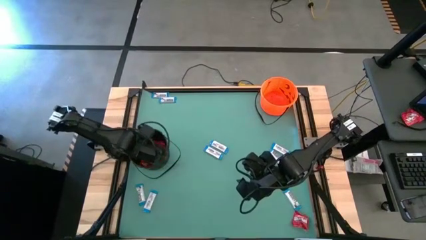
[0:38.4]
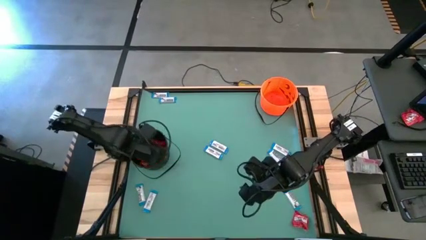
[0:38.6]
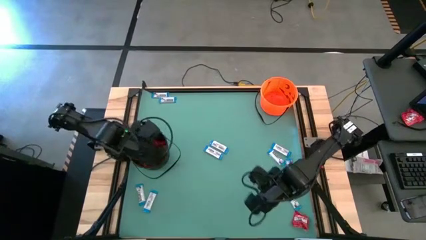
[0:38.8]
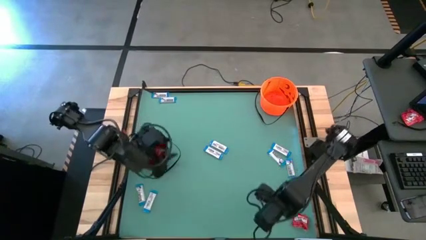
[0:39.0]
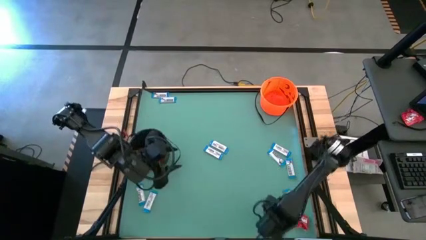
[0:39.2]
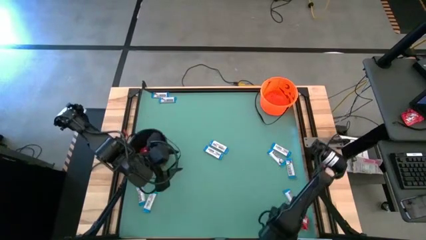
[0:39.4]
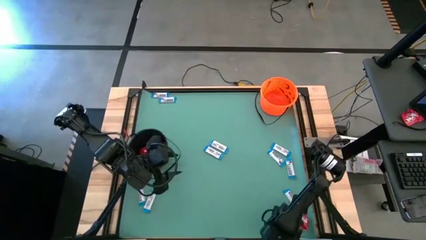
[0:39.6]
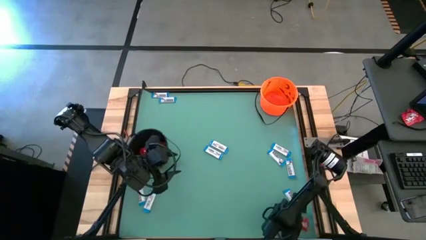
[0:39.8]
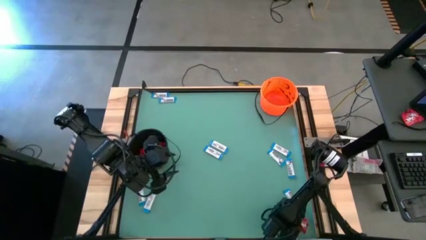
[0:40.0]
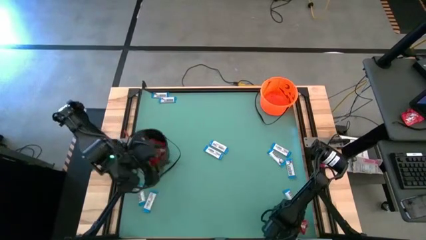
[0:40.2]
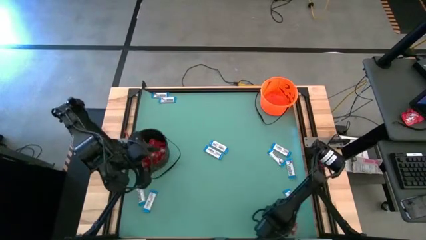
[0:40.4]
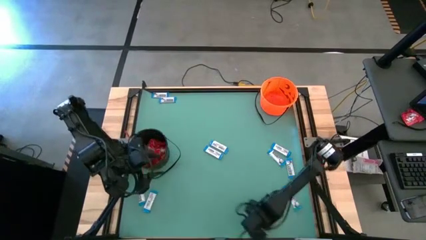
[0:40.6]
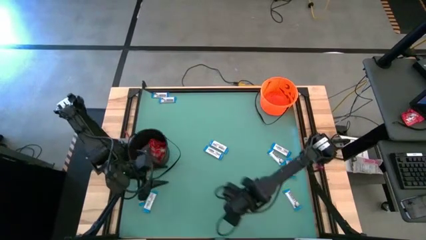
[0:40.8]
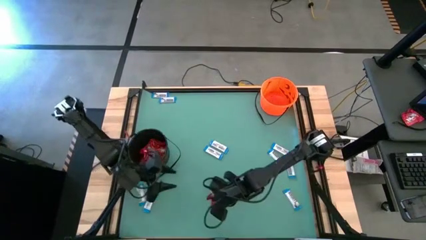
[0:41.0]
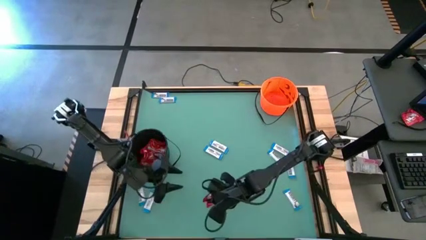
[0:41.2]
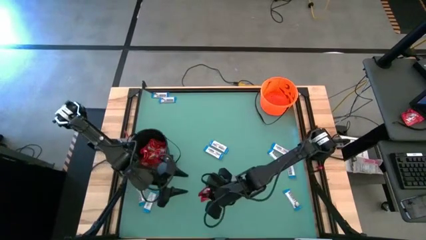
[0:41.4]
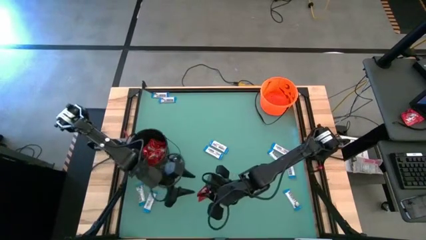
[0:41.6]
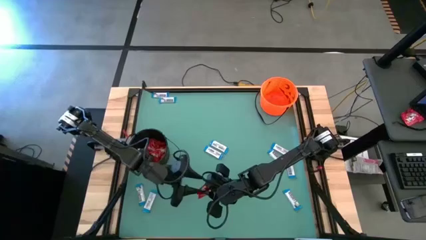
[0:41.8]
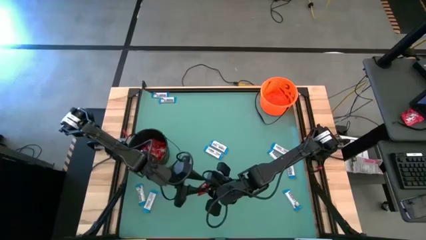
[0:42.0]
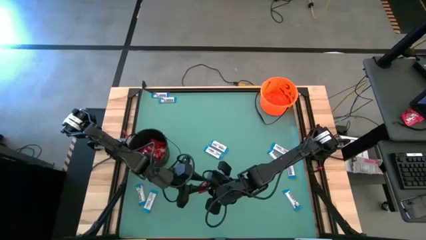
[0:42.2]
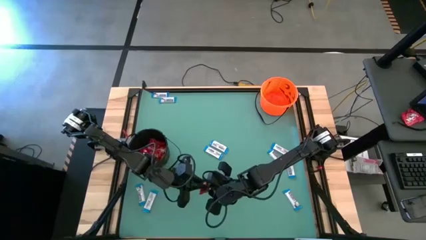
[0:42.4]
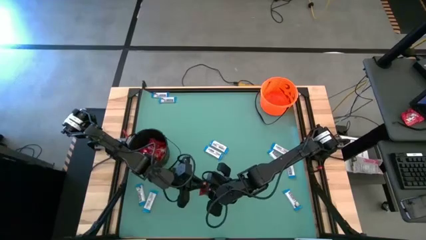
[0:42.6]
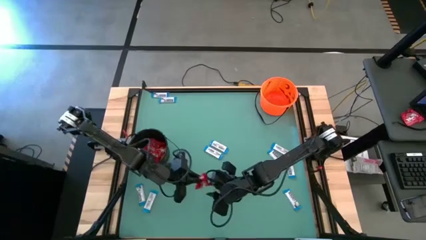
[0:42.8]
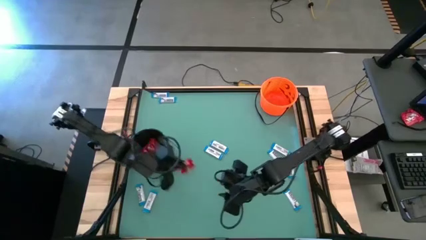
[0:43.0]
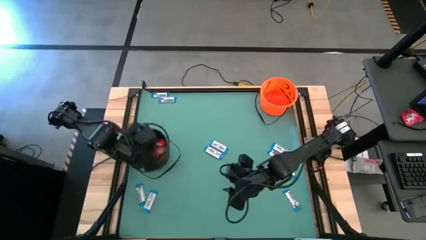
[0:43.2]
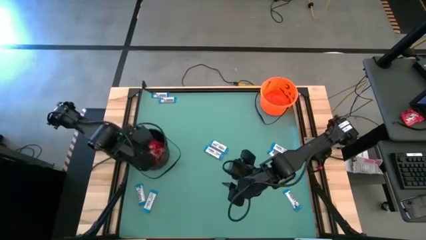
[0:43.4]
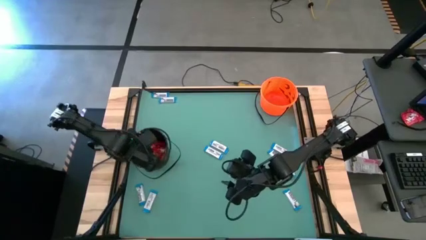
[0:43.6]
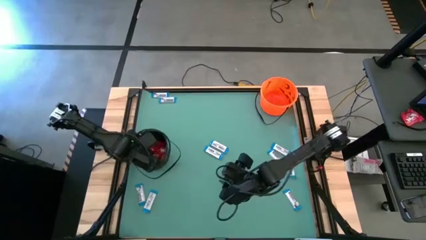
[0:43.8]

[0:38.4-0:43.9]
Task: Sort candy by brand, put in halloween buckets
Put the red candy into the black bucket

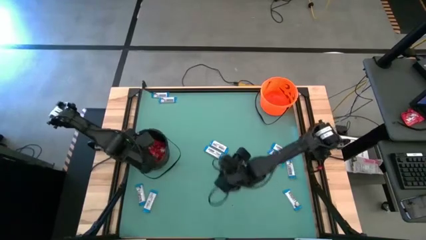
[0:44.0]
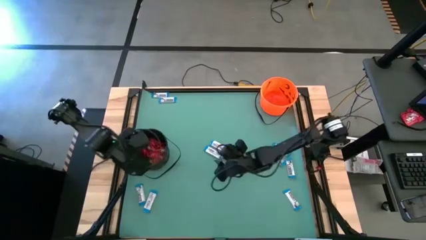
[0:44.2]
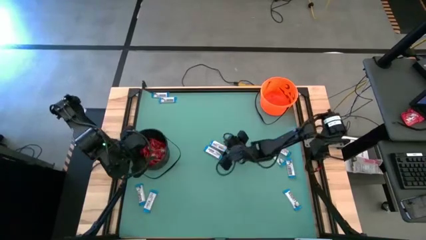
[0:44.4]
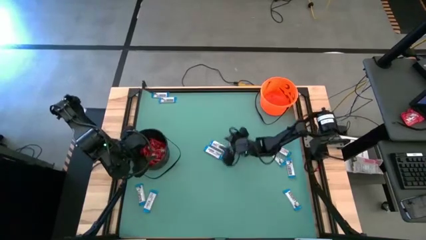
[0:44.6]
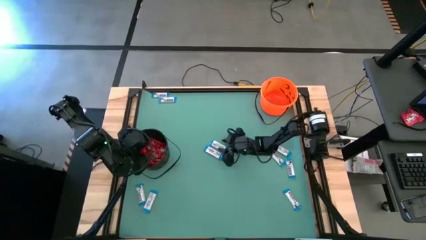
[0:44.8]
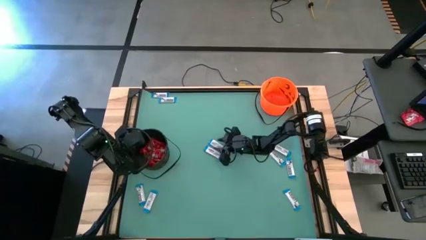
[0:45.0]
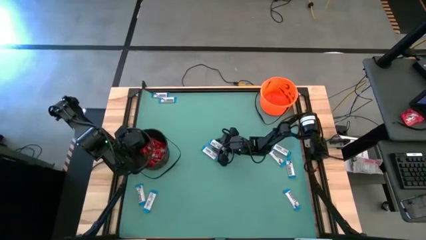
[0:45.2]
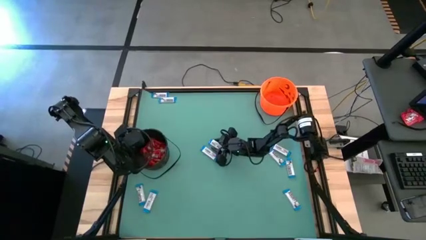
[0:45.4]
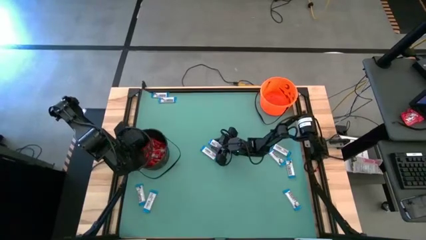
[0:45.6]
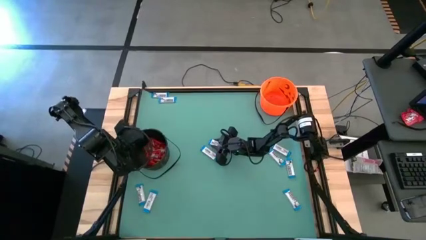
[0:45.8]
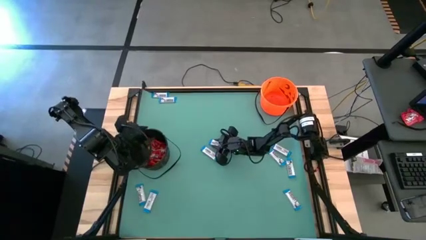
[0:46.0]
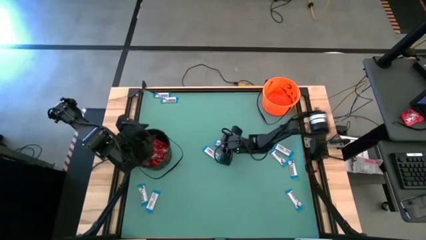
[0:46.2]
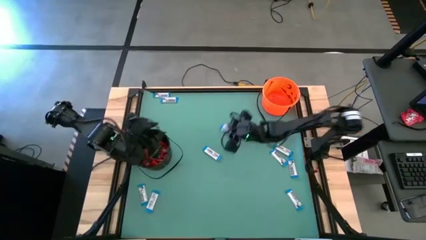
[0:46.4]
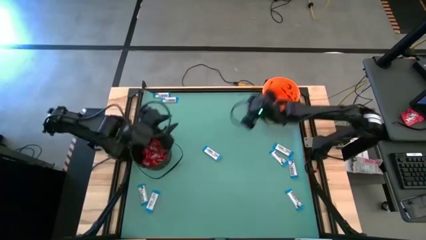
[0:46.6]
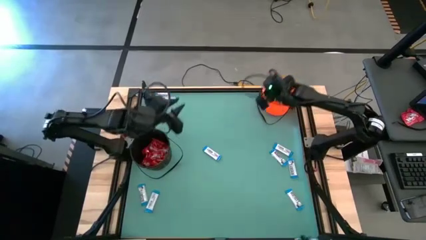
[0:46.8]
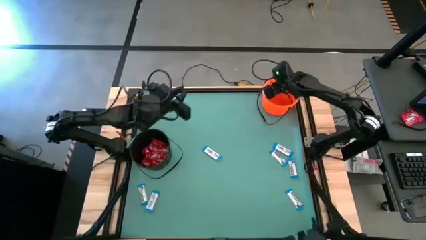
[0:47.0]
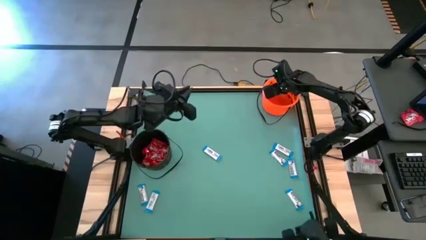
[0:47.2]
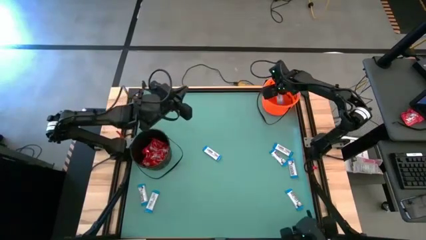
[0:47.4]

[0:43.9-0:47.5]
Put the white chocolate into the orange bucket

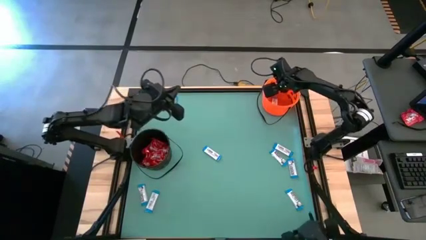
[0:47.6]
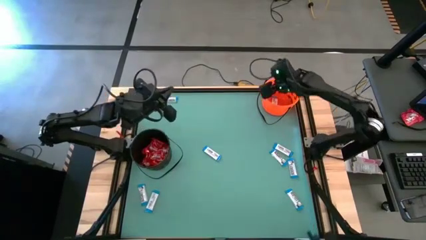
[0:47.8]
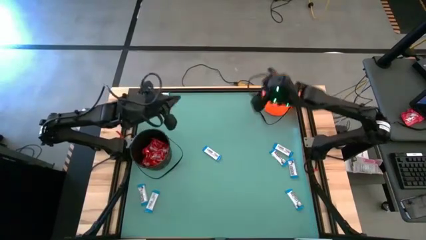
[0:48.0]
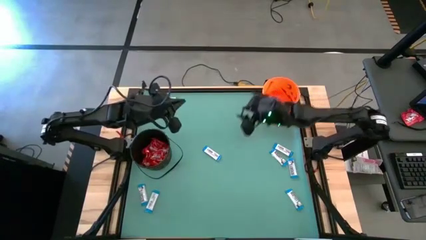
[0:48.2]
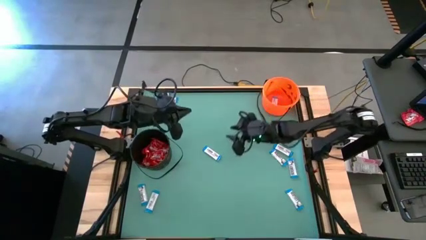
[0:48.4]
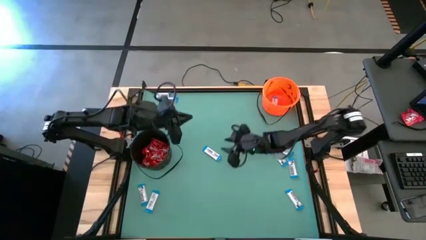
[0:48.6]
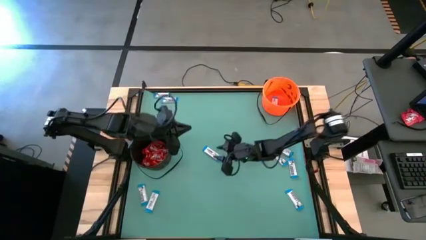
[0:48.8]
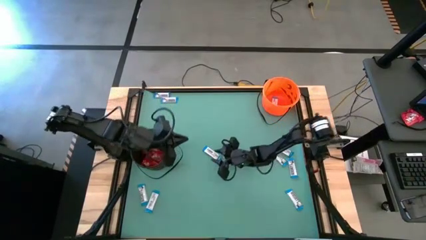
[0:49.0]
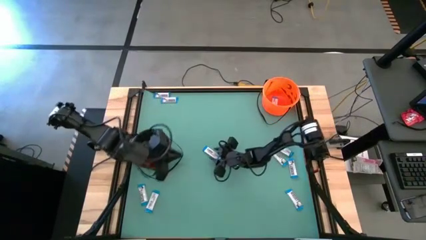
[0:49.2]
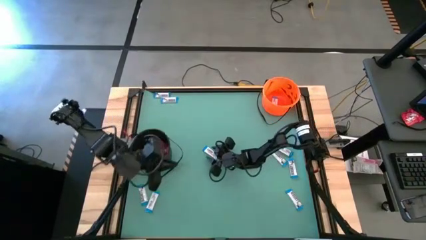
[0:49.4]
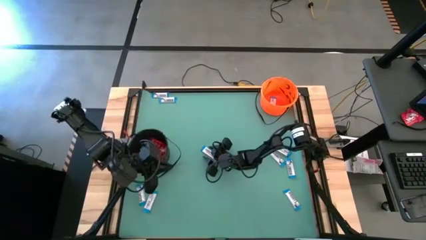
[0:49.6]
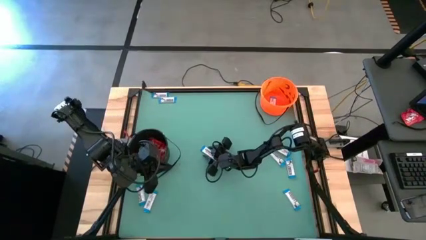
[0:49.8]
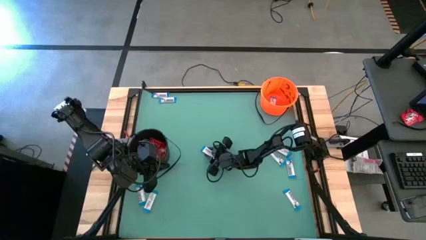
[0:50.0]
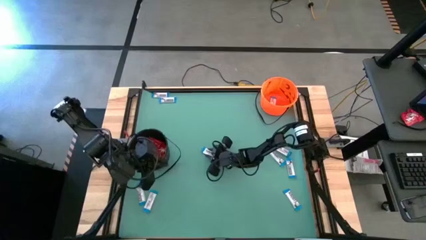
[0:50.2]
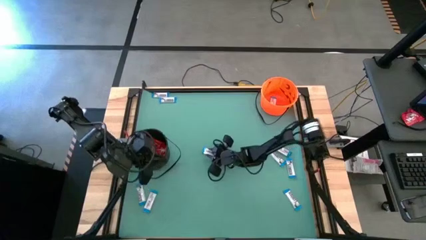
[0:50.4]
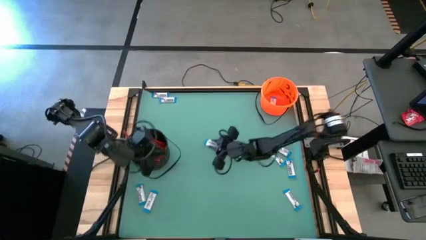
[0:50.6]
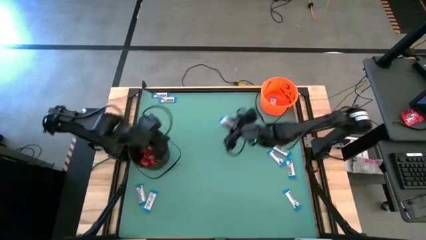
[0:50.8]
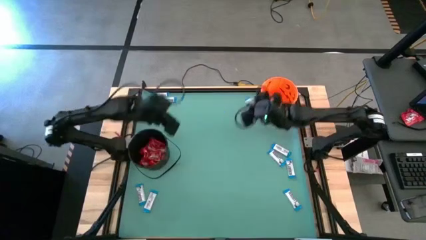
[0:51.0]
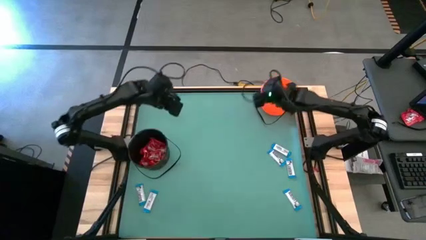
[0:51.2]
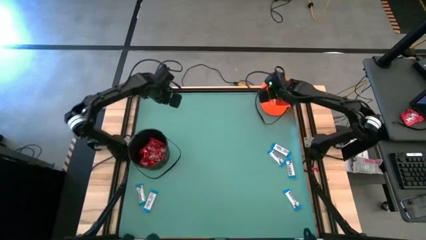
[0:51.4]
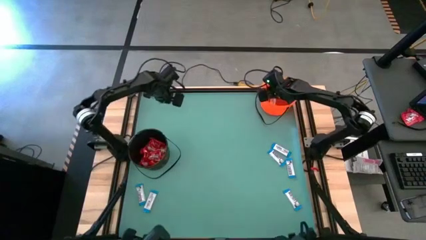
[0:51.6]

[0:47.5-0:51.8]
Put the white chocolate into the orange bucket

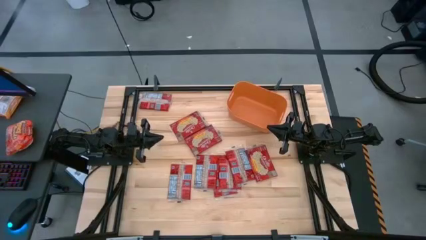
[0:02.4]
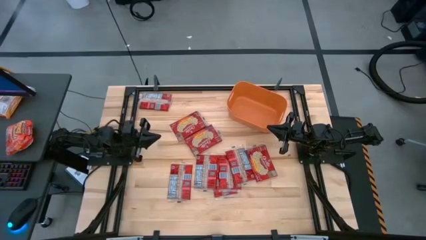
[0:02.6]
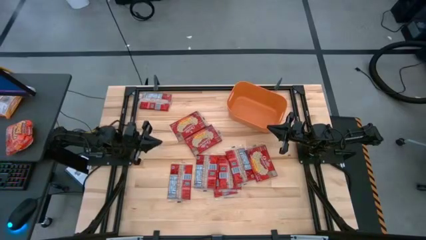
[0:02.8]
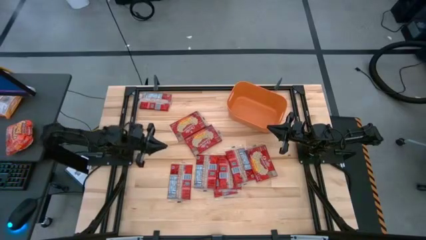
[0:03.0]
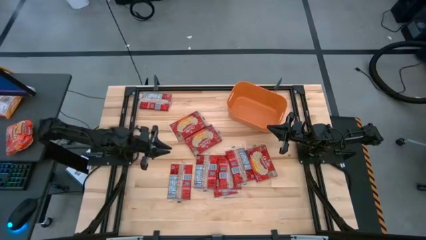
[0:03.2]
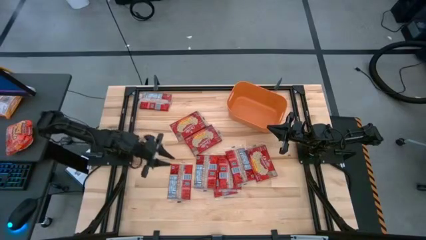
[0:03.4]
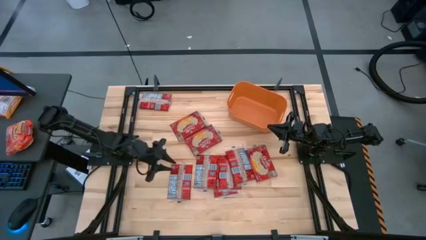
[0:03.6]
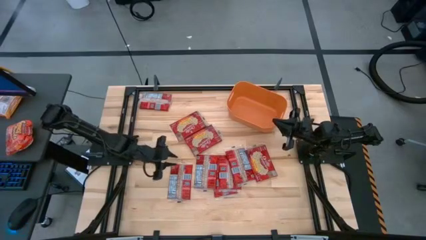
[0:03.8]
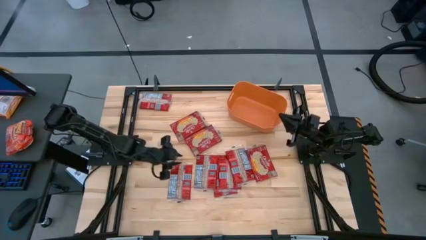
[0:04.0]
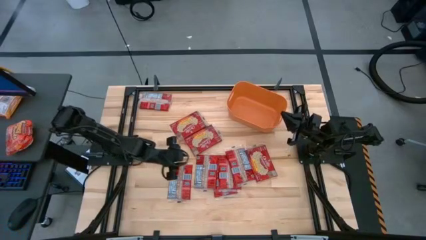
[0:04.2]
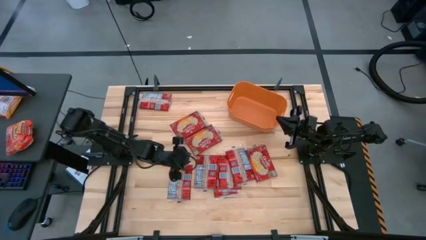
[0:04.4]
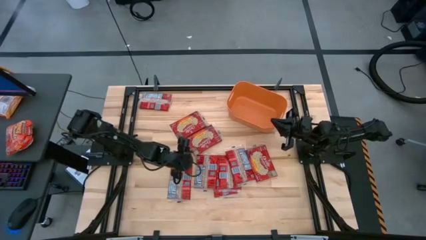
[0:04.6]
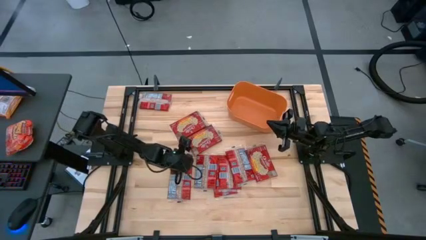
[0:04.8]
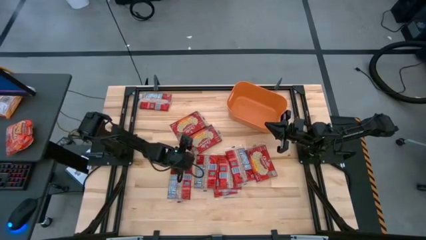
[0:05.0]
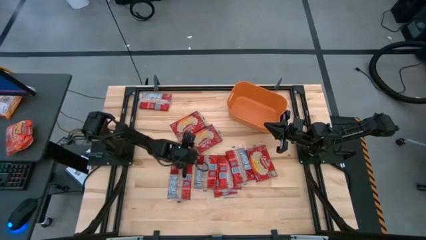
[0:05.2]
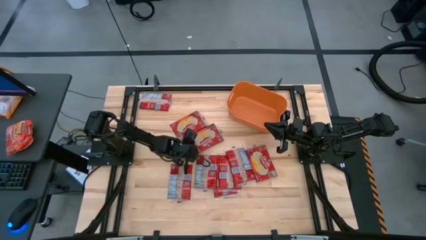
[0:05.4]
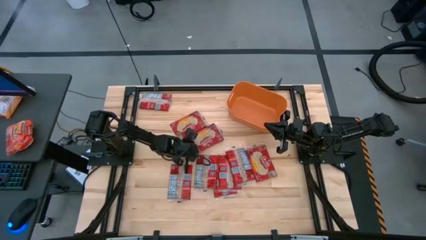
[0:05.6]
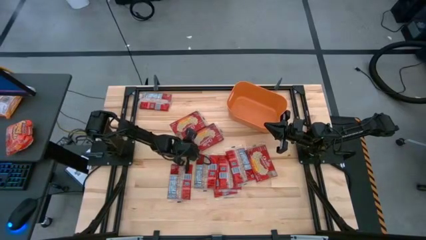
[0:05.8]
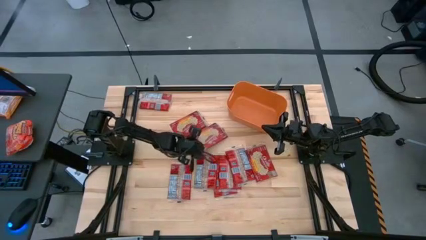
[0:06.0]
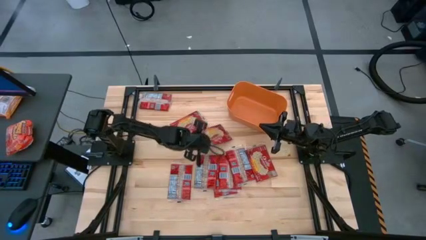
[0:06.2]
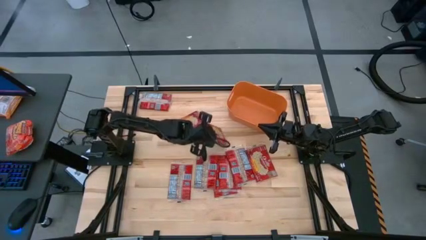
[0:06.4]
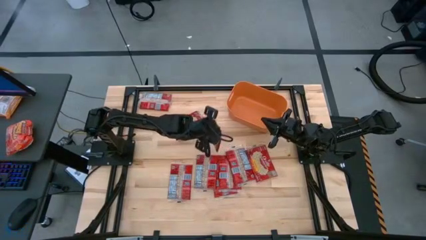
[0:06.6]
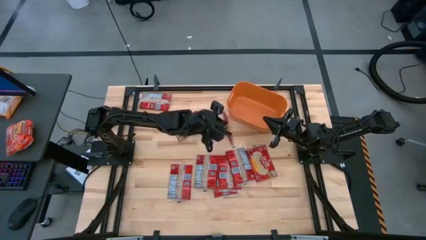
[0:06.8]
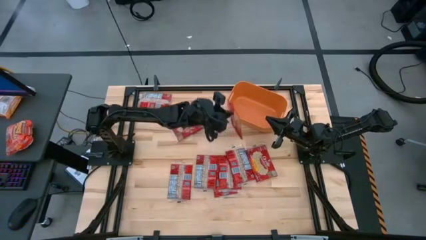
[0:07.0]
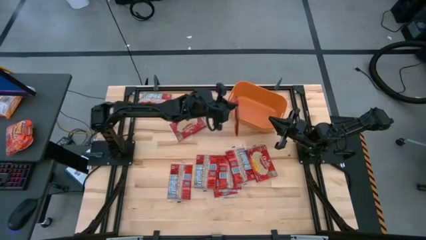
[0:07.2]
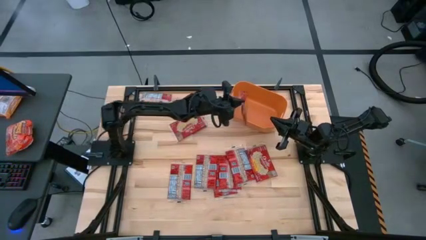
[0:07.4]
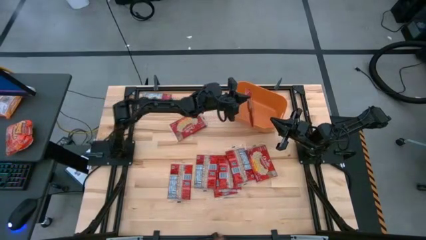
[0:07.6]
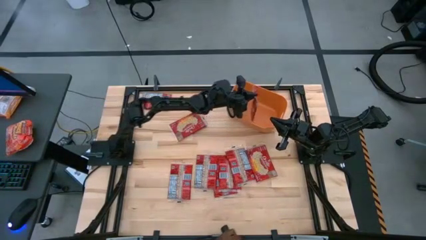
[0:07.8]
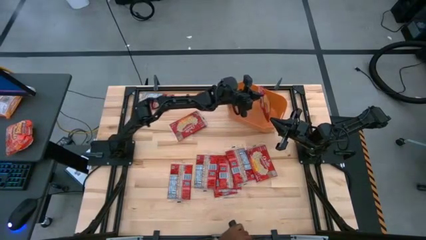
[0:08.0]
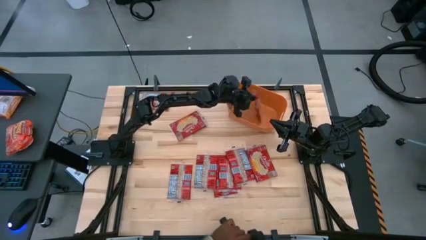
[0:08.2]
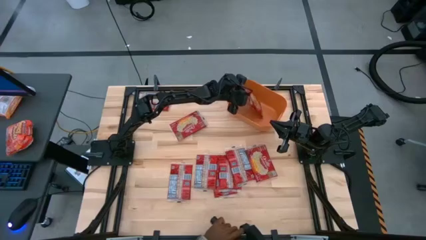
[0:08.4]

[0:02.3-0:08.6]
Task: Sort popcorn bags into baskets
Put the red popcorn bag into the orange bin
